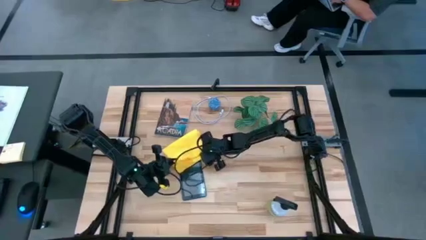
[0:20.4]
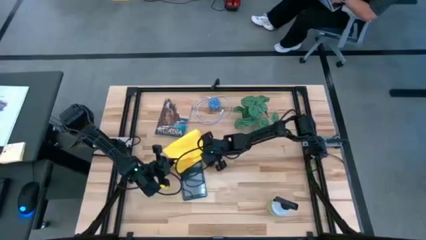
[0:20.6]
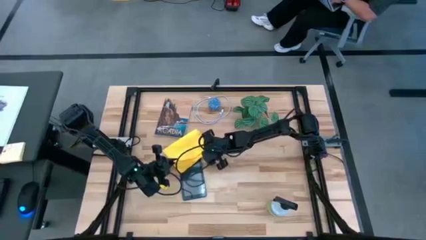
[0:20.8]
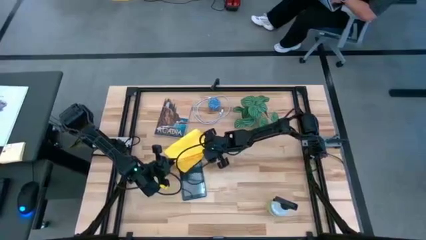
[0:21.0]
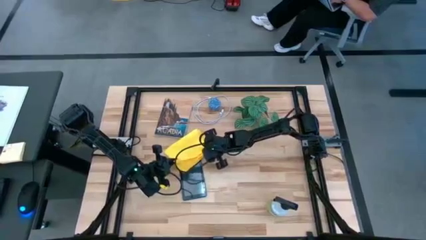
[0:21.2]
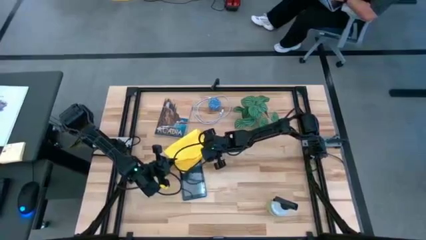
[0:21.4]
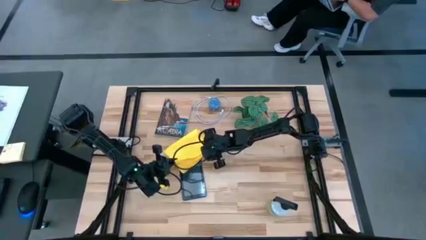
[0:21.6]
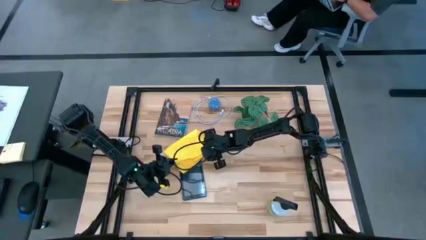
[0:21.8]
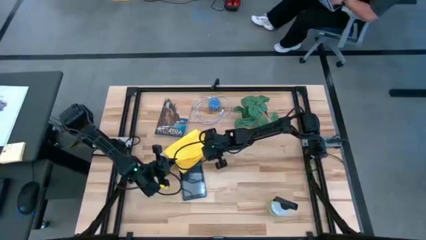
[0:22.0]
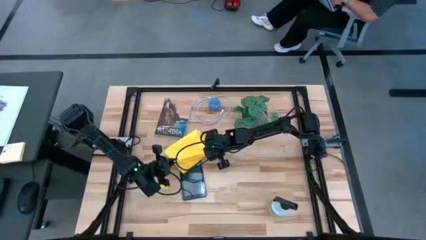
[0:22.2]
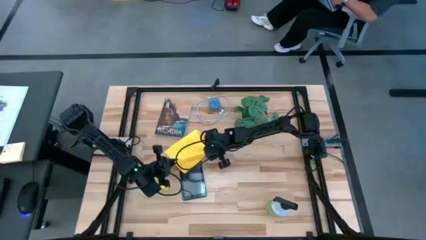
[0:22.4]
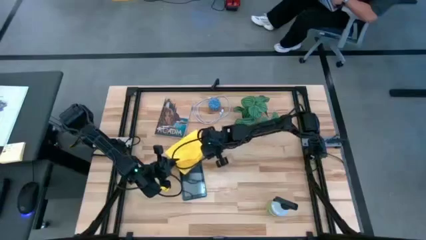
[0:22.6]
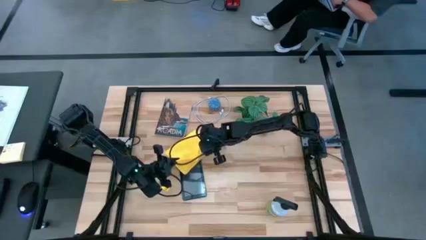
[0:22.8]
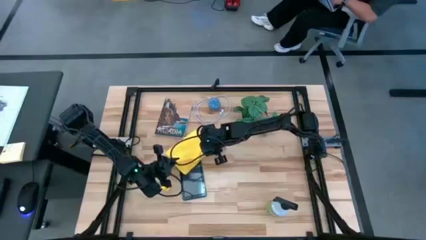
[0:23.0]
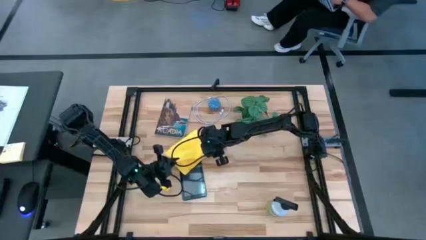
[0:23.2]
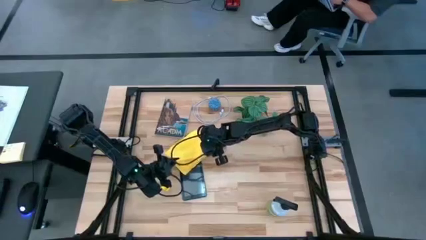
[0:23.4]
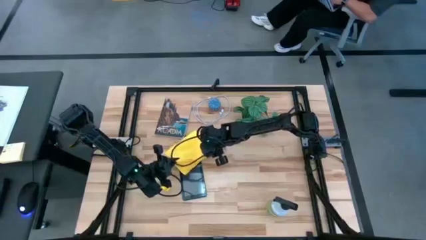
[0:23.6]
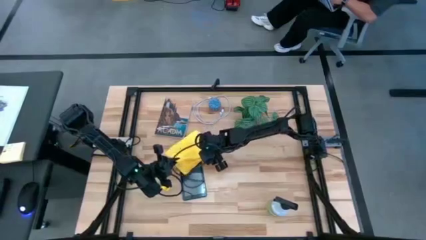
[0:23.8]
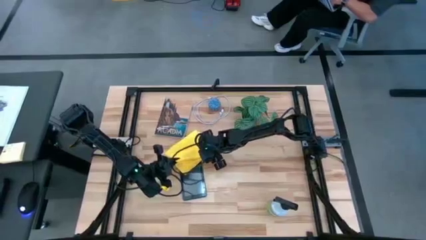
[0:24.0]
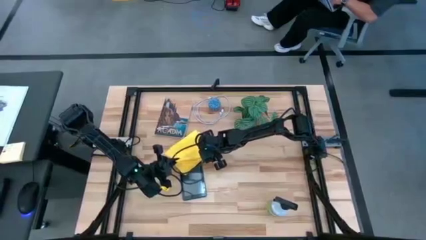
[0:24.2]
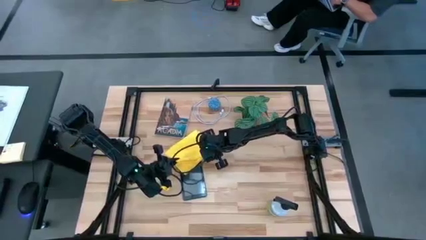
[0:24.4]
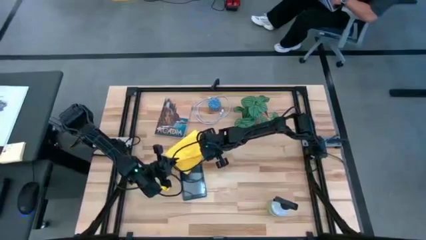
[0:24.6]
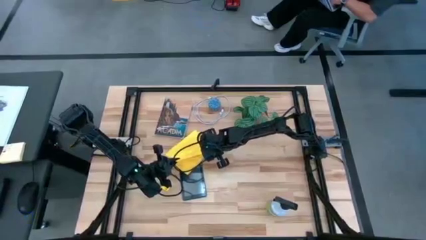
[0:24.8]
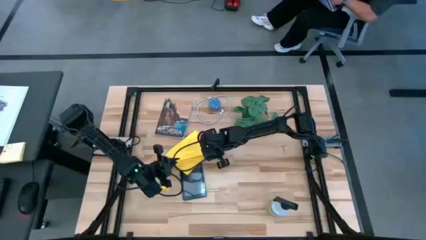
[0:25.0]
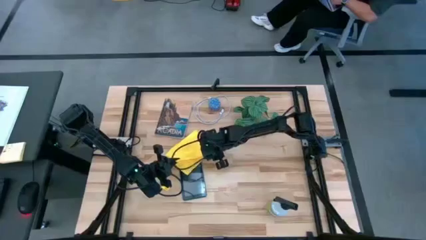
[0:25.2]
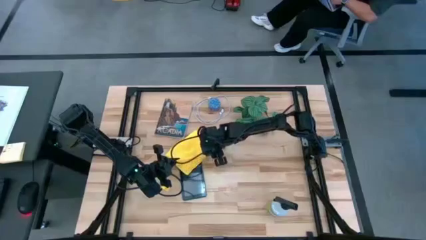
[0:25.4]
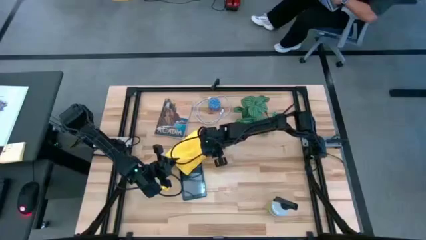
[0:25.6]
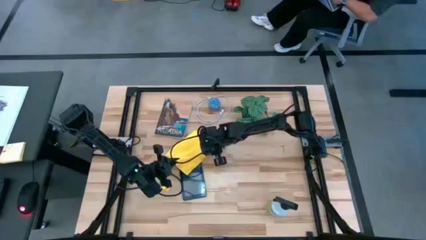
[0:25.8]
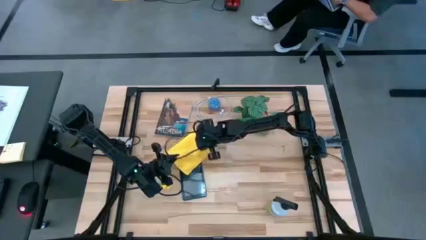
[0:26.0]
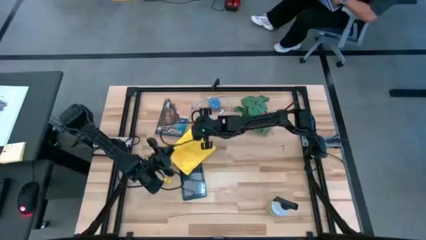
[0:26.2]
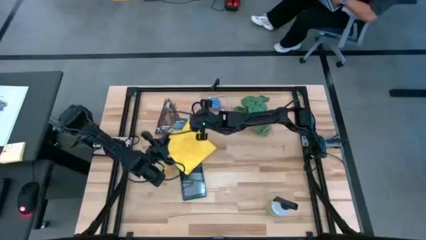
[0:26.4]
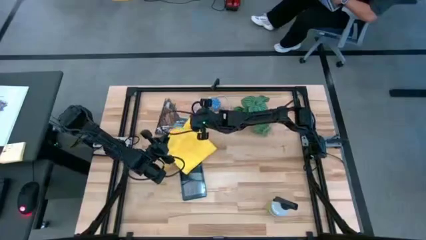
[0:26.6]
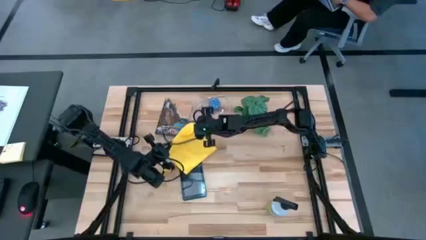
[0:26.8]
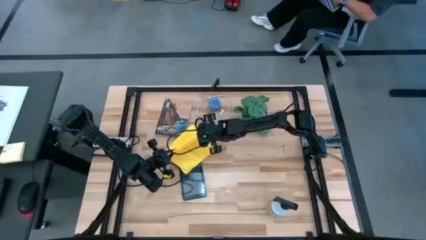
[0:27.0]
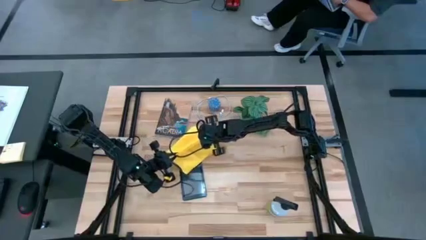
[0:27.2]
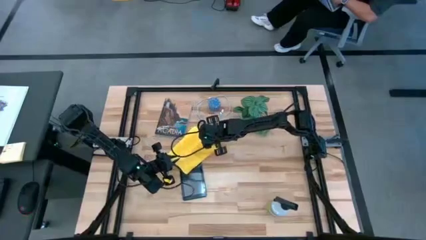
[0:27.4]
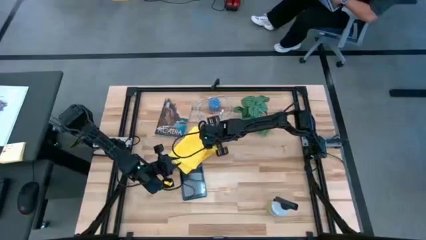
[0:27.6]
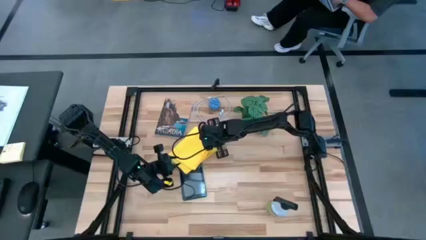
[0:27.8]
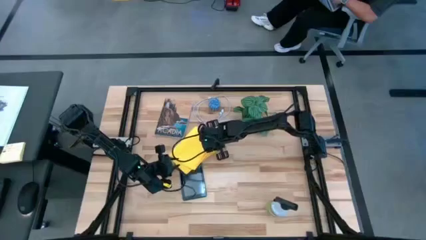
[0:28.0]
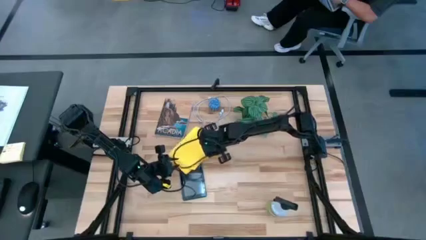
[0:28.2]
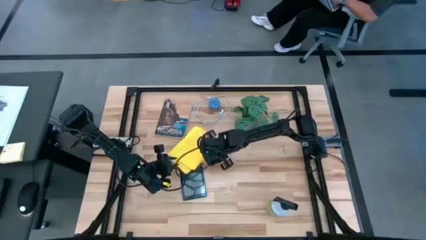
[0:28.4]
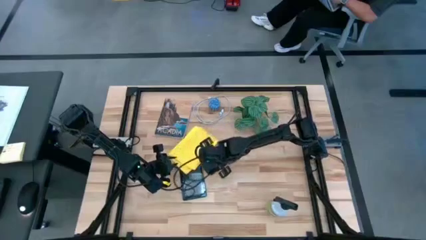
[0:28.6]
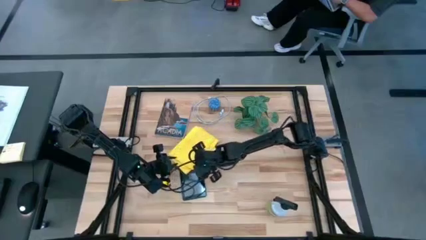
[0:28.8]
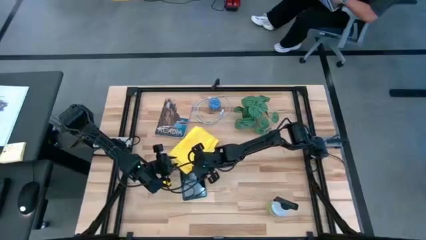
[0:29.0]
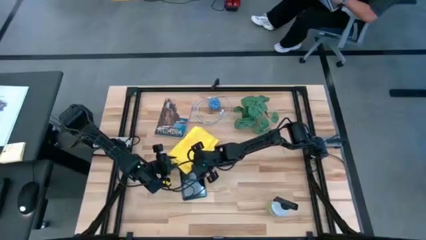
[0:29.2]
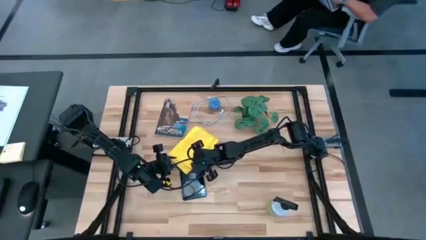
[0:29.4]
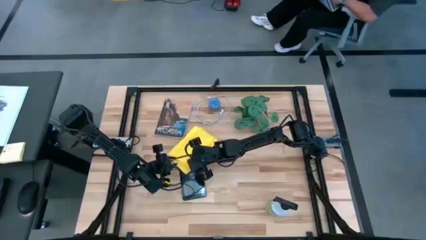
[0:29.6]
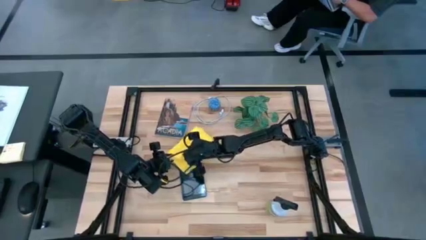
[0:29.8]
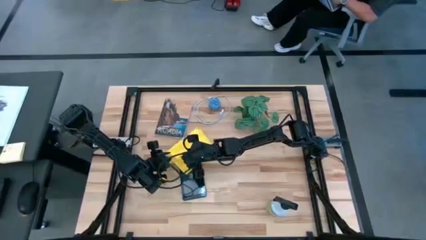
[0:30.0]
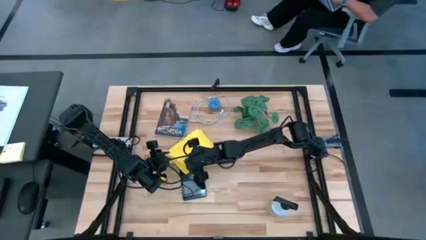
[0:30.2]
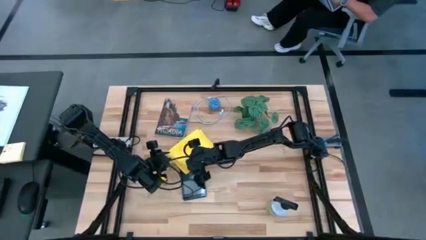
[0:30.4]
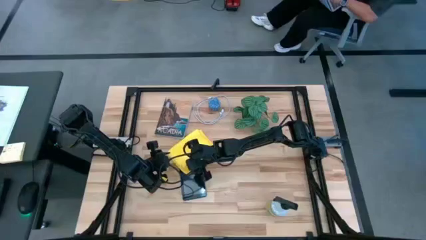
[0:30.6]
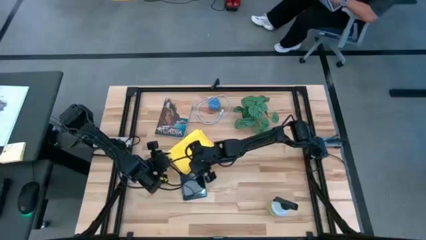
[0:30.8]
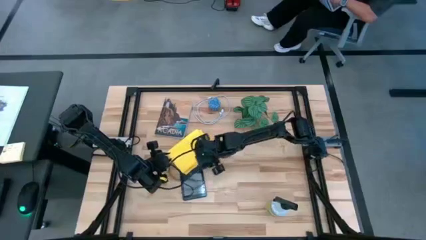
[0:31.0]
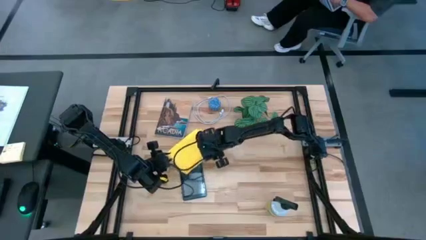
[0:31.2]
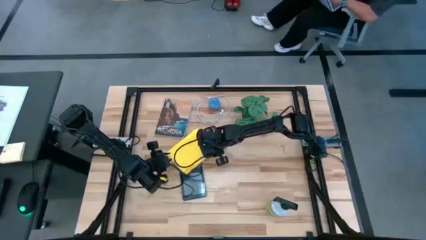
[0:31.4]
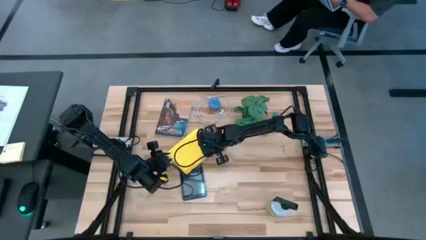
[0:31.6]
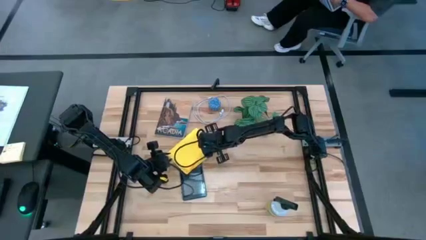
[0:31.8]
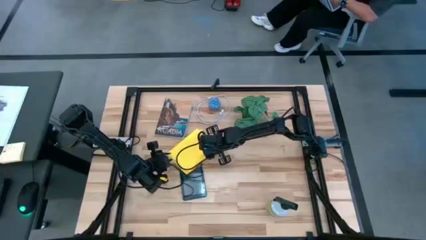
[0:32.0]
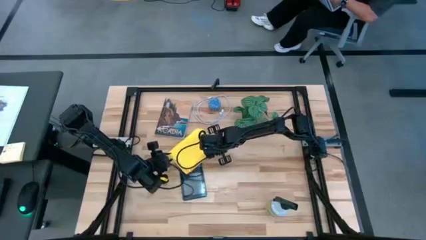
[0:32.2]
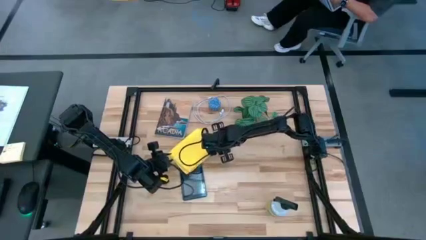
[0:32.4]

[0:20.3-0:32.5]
Task: Clean tablet
Prepare the microfiber towel to clean the tablet
